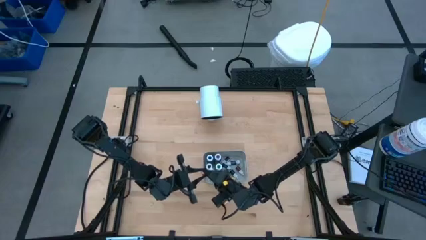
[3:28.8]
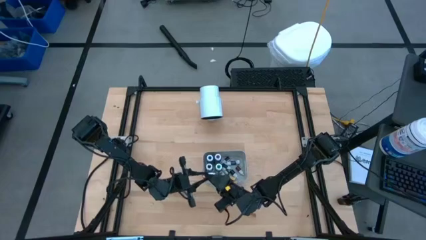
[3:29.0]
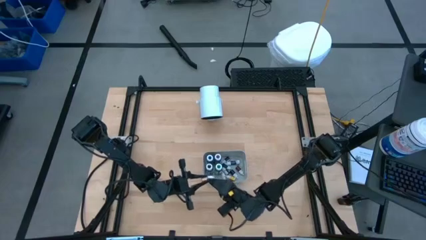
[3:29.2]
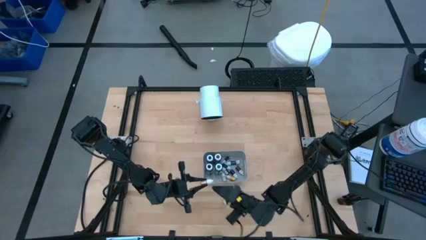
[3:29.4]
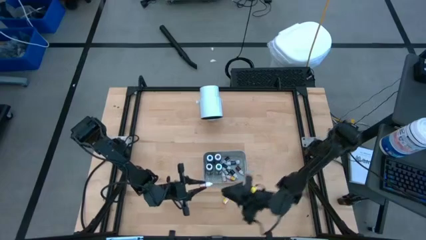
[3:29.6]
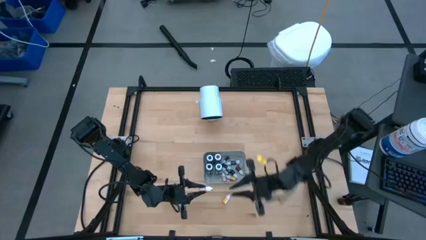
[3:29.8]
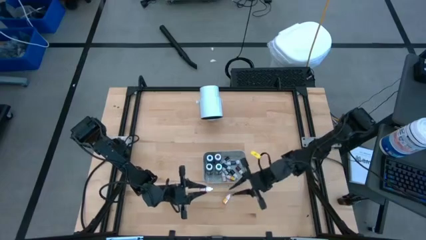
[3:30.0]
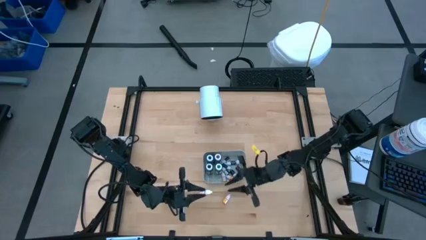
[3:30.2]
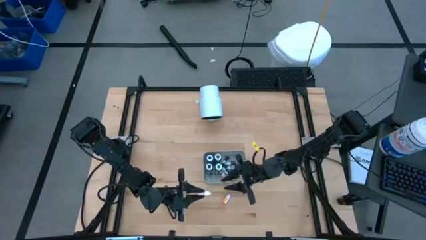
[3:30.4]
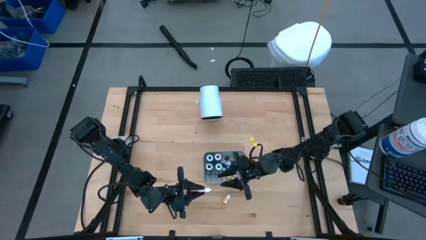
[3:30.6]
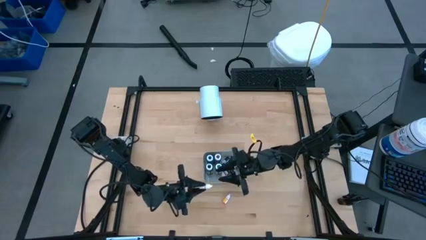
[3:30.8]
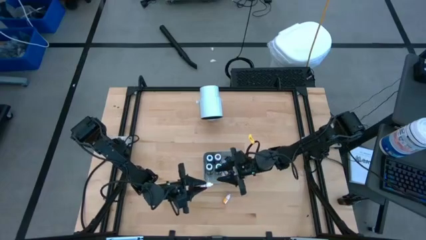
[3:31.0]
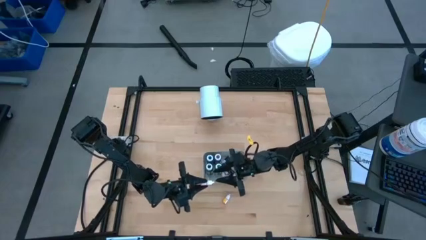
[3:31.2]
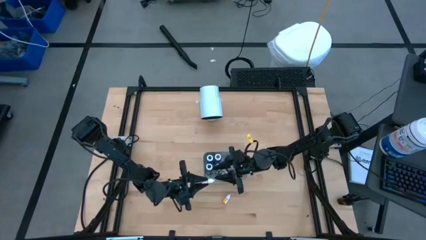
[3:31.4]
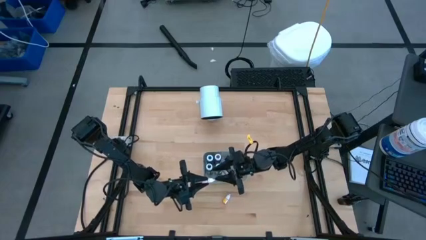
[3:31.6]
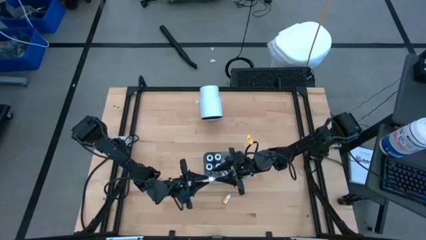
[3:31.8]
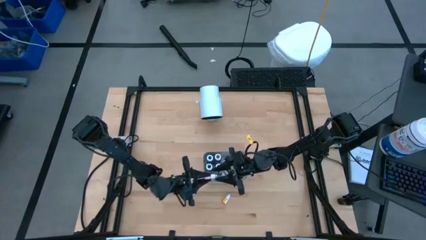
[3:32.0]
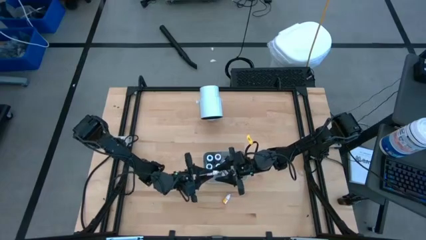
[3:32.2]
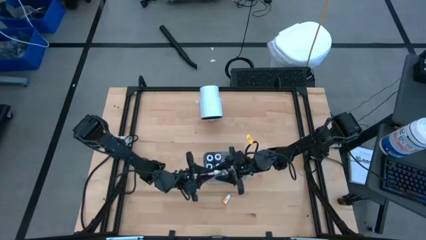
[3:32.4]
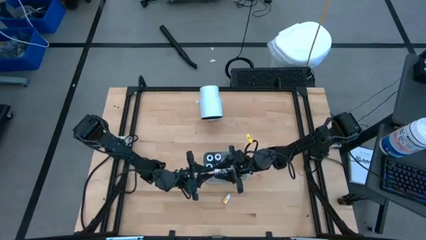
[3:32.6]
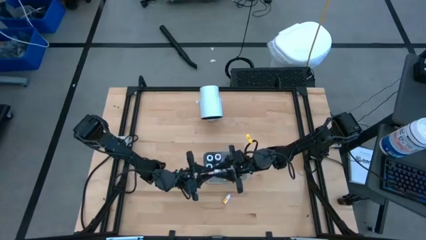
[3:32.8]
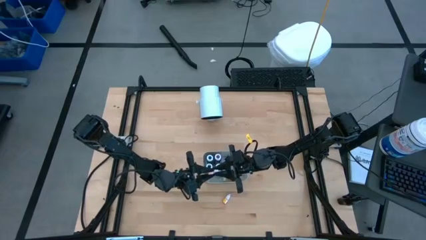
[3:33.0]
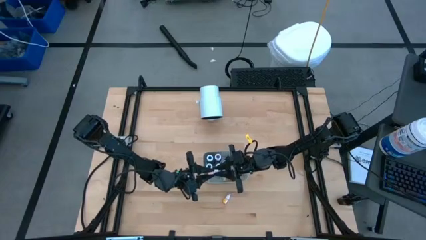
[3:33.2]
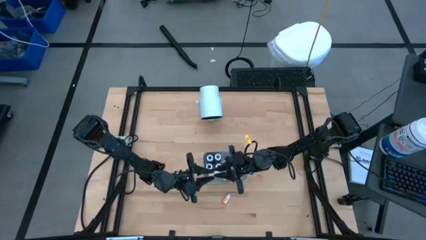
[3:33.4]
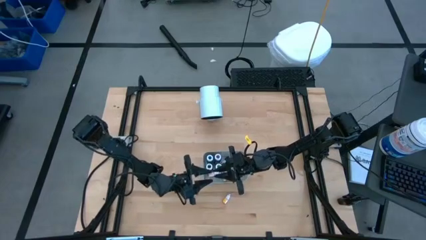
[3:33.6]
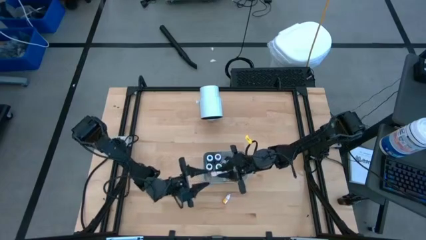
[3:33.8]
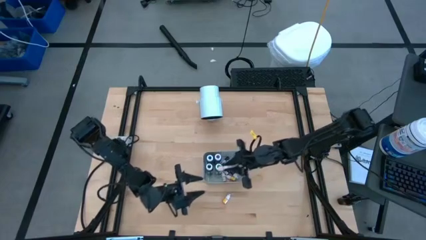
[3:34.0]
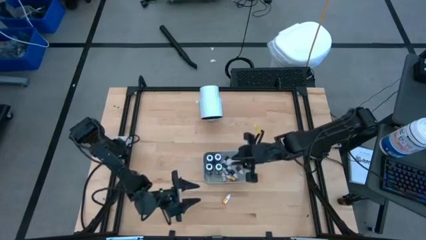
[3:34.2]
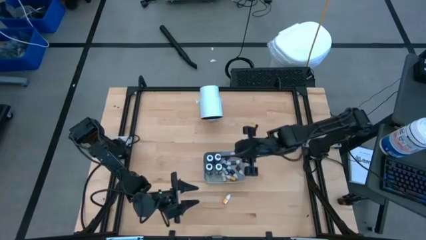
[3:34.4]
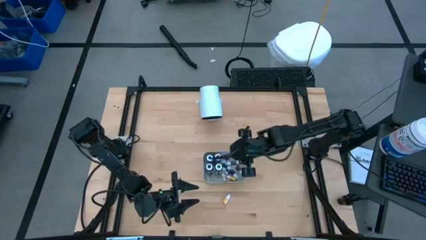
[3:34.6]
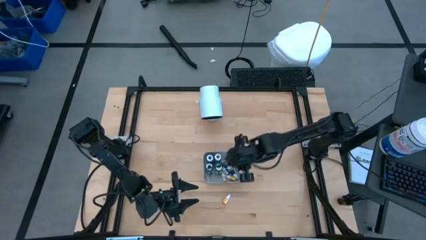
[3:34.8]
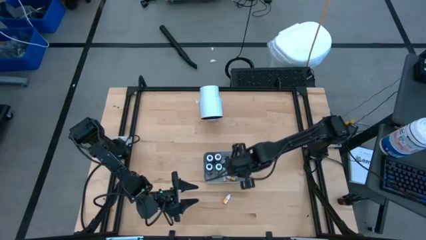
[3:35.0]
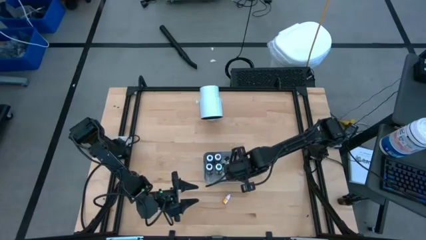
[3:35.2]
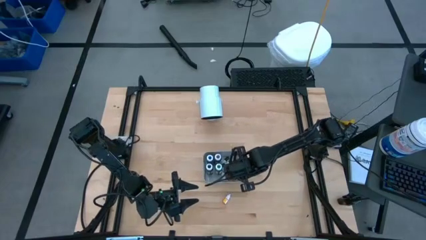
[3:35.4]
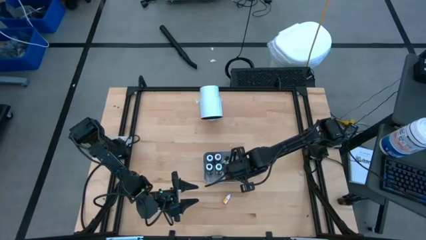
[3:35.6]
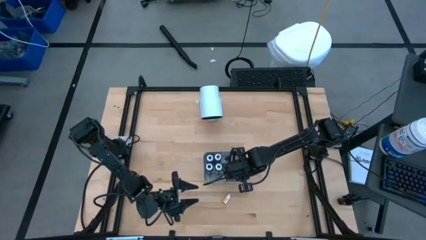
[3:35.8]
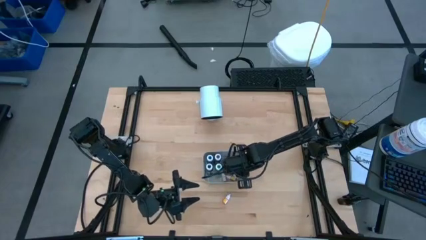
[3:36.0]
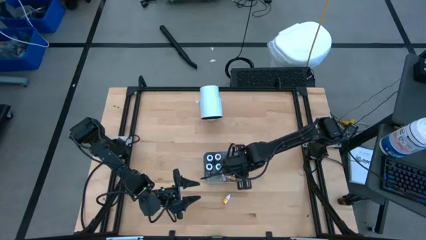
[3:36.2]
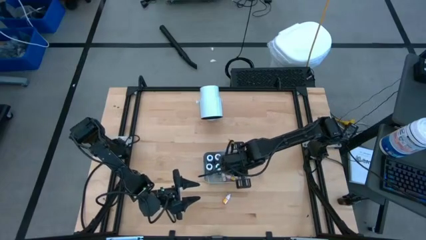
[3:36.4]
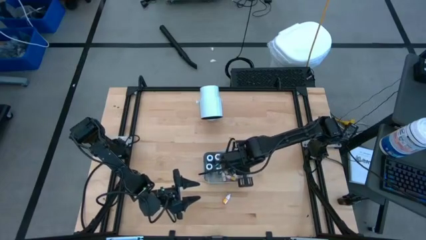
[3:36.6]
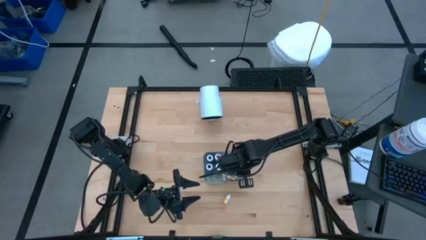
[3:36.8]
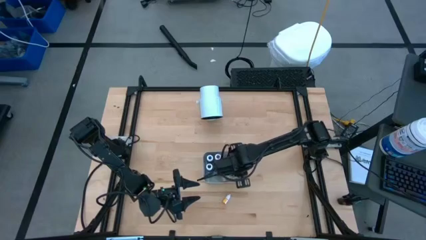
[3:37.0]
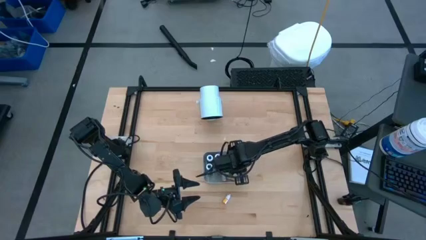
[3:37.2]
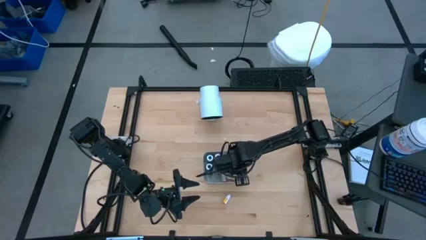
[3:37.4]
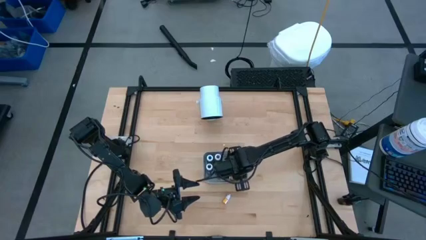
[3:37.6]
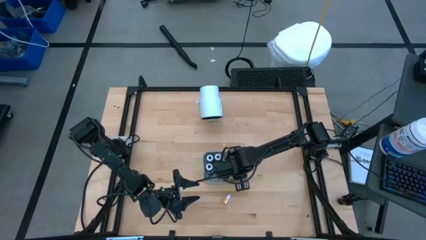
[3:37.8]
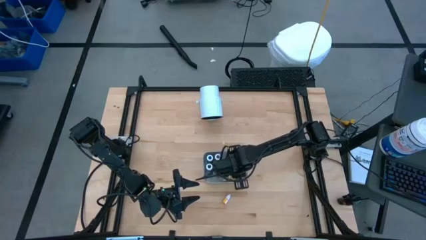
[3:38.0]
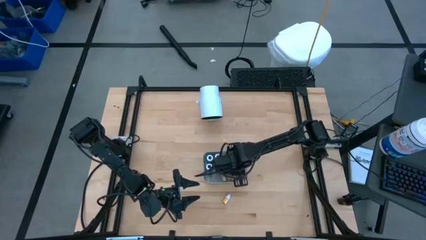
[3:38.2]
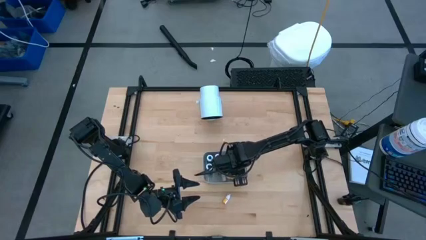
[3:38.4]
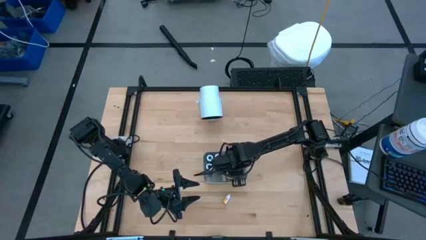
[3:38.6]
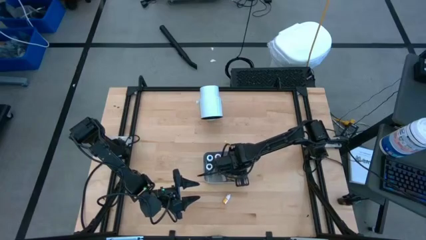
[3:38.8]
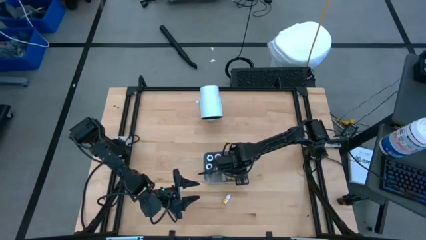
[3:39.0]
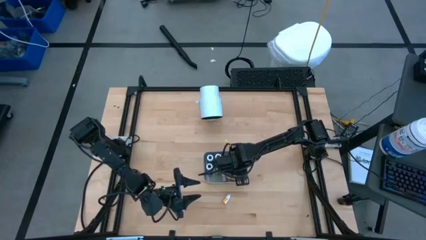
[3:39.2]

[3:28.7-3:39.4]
Task: Pick & Place food coloring
Put the orange food coloring bottle into the gray bin
